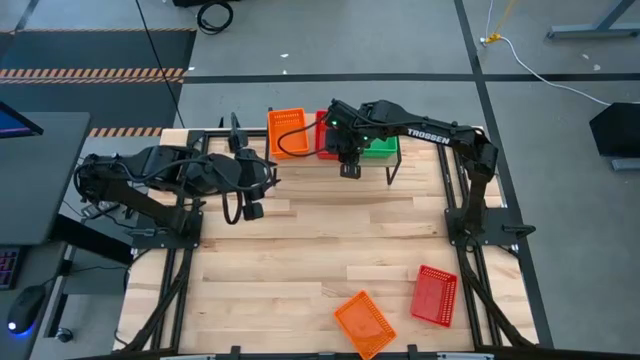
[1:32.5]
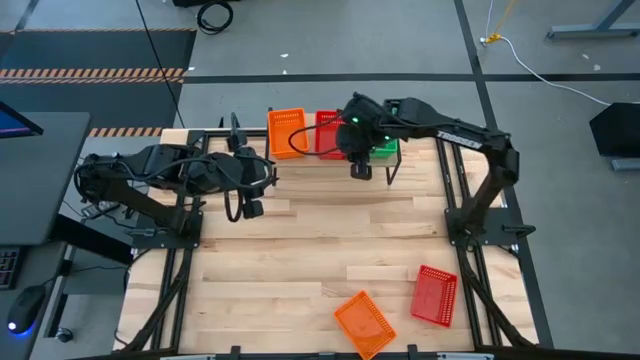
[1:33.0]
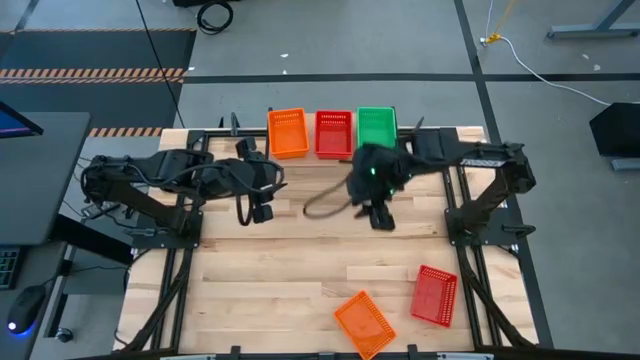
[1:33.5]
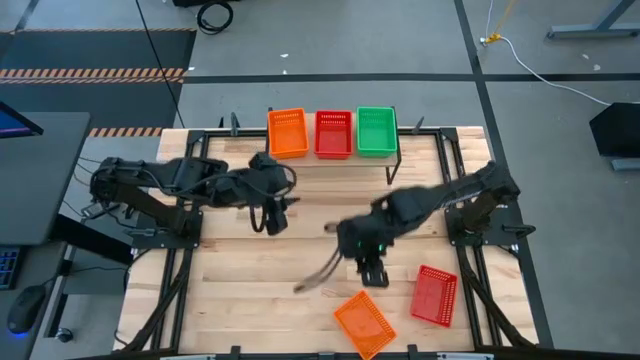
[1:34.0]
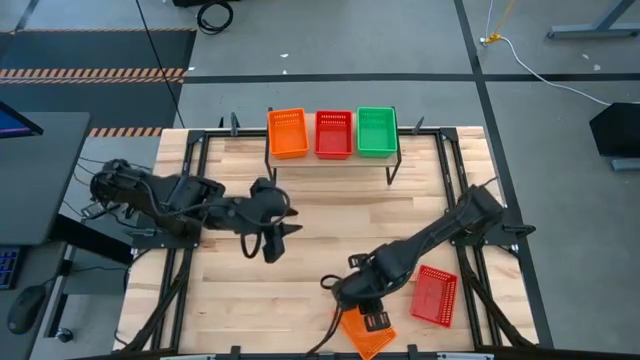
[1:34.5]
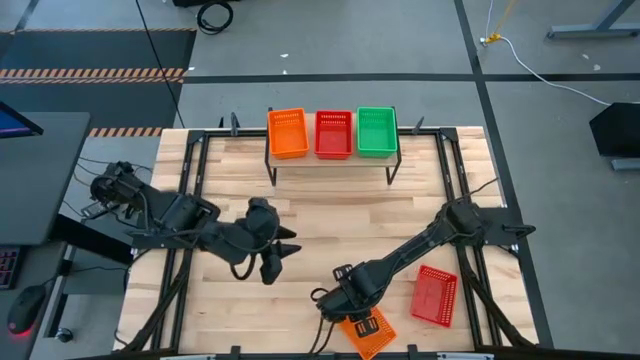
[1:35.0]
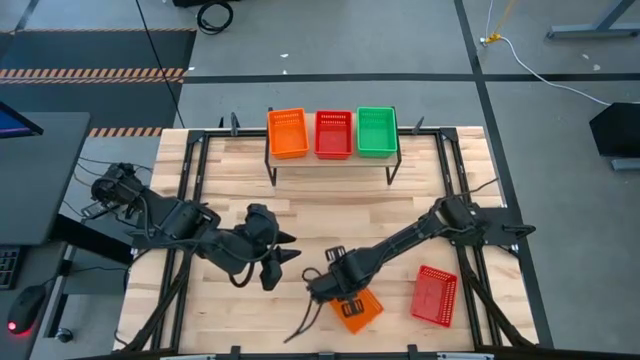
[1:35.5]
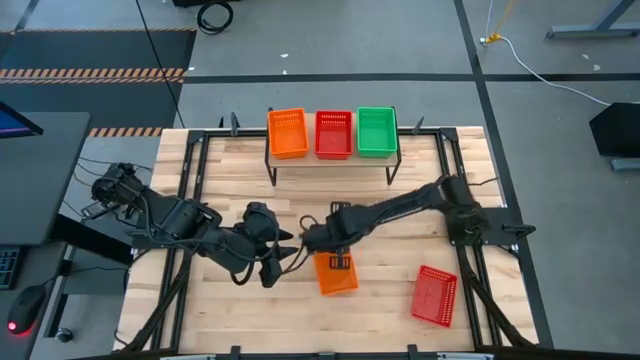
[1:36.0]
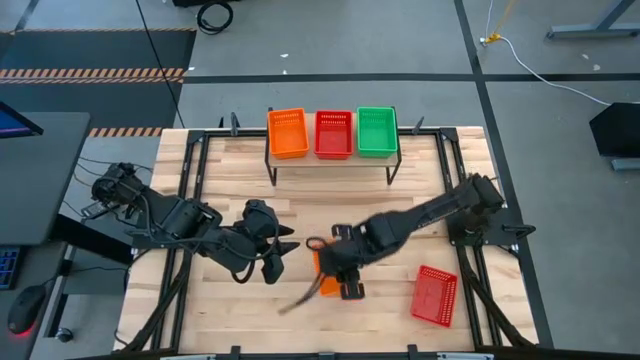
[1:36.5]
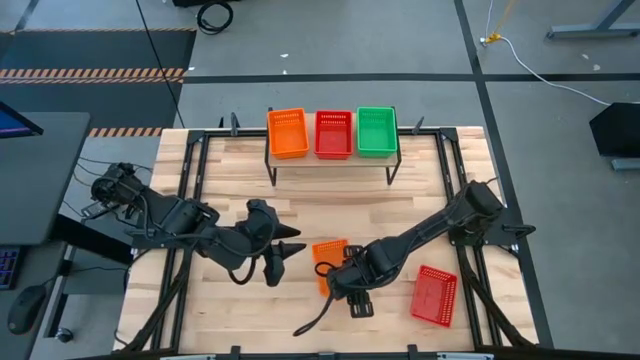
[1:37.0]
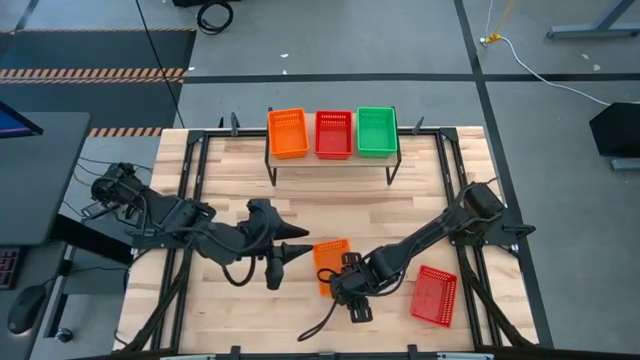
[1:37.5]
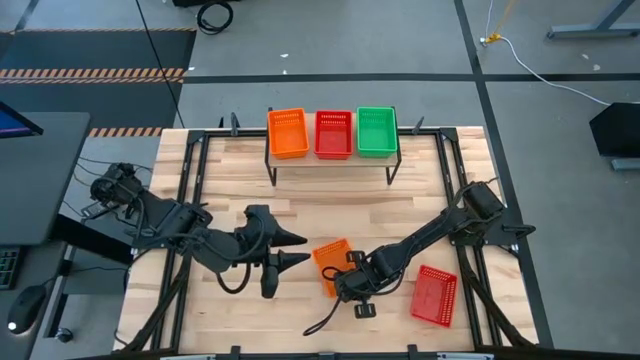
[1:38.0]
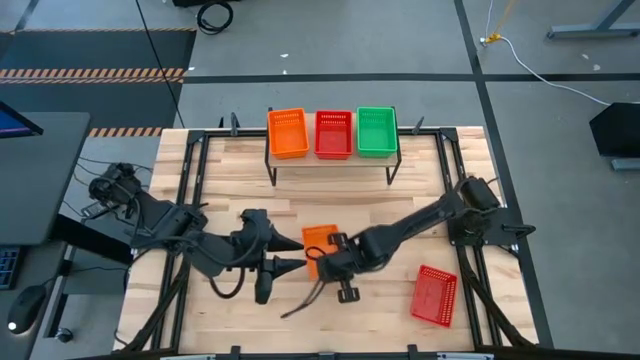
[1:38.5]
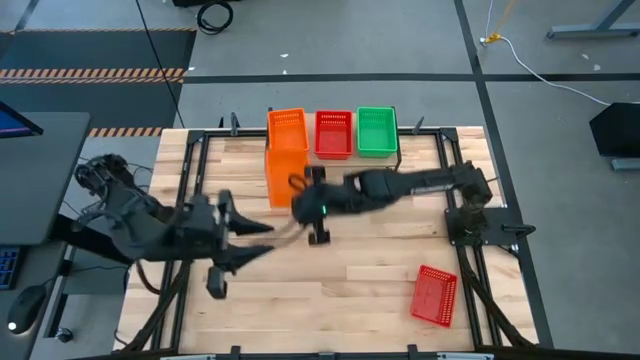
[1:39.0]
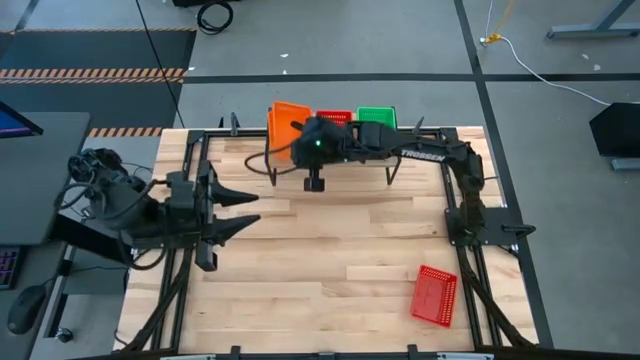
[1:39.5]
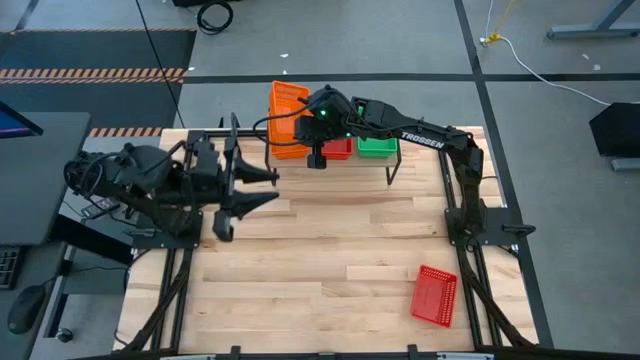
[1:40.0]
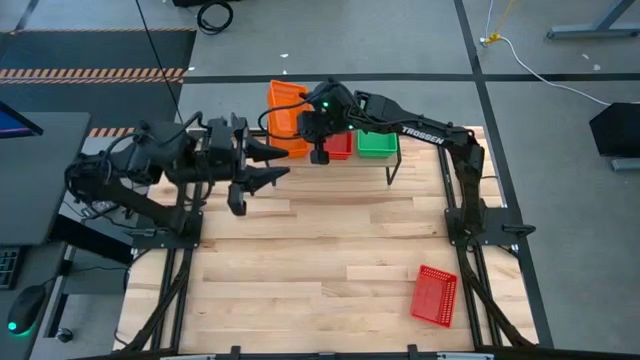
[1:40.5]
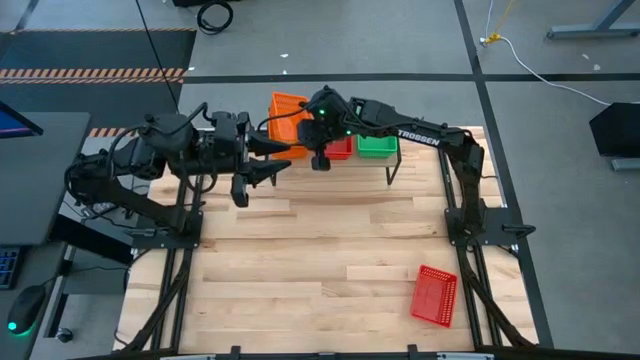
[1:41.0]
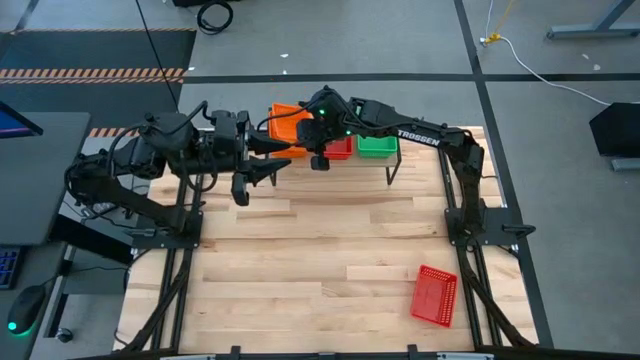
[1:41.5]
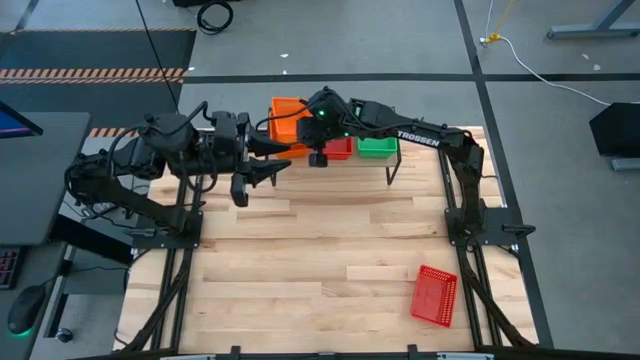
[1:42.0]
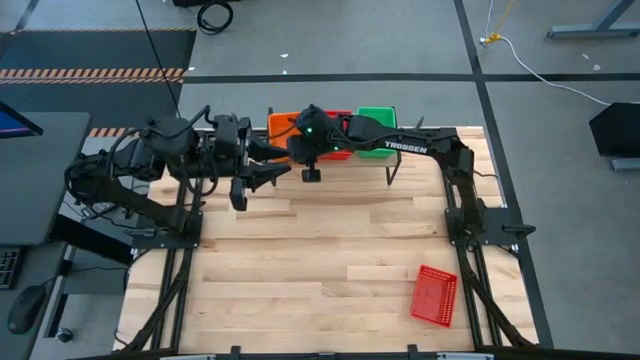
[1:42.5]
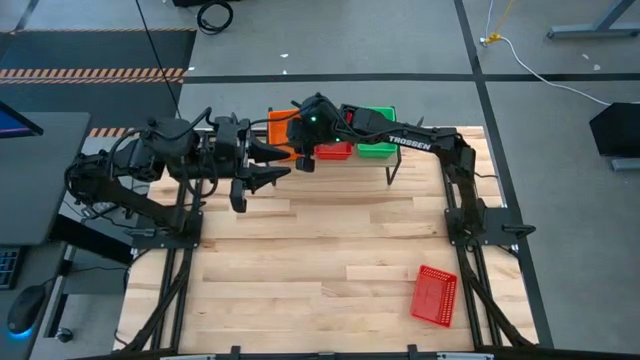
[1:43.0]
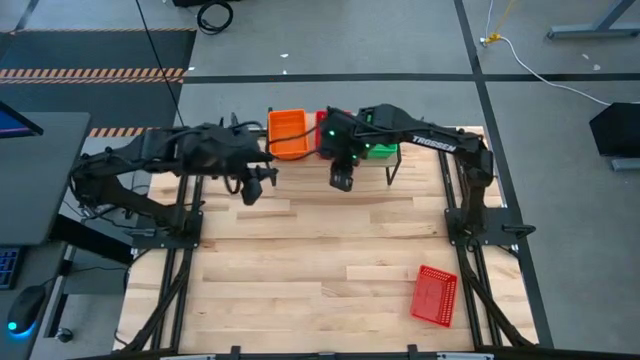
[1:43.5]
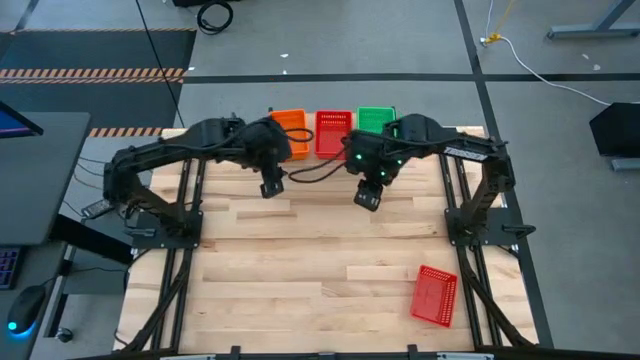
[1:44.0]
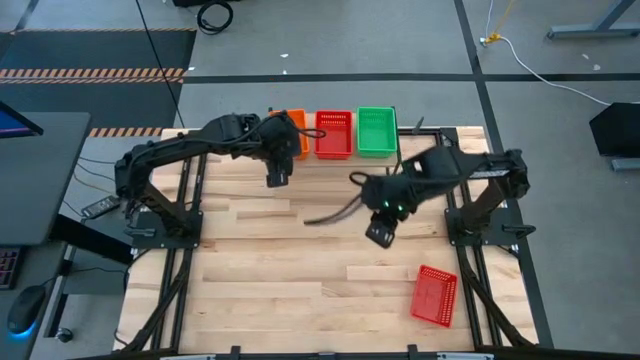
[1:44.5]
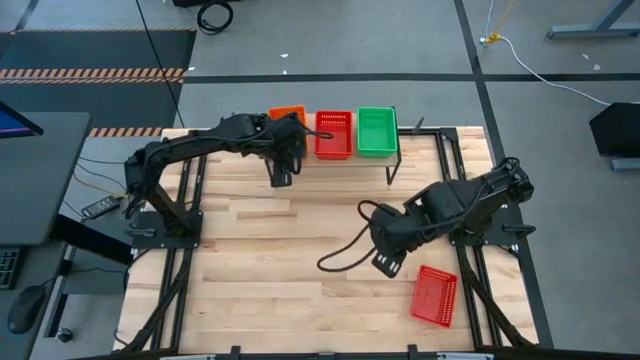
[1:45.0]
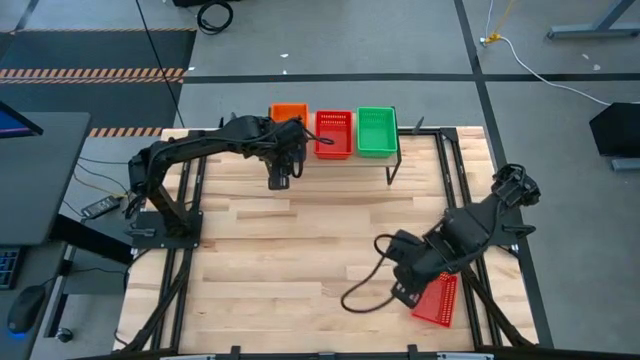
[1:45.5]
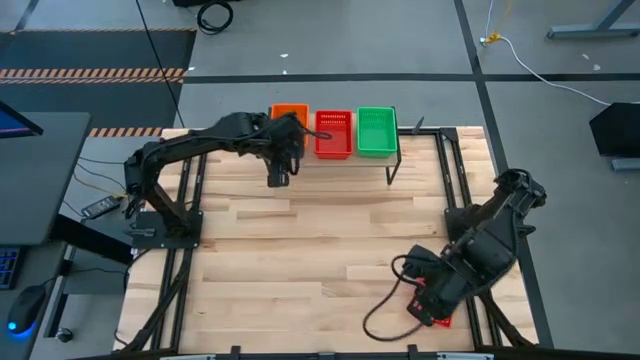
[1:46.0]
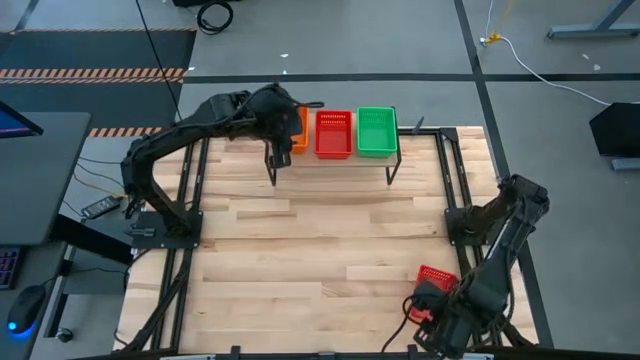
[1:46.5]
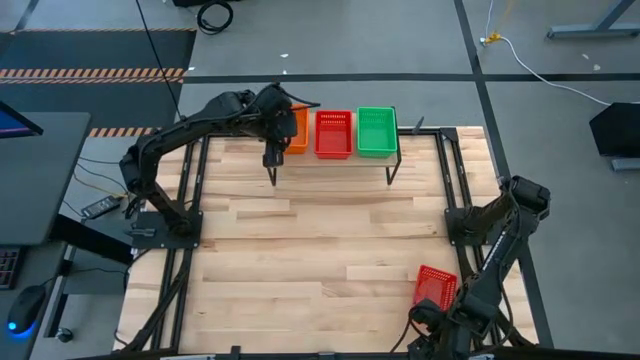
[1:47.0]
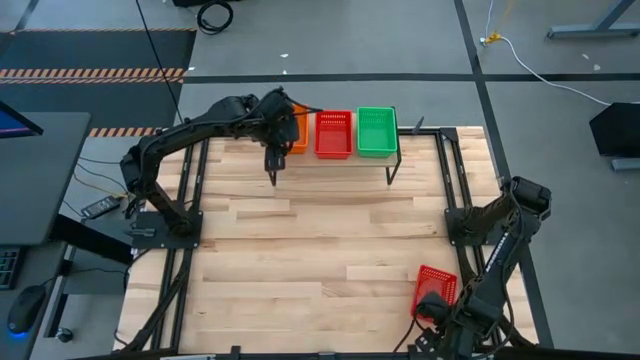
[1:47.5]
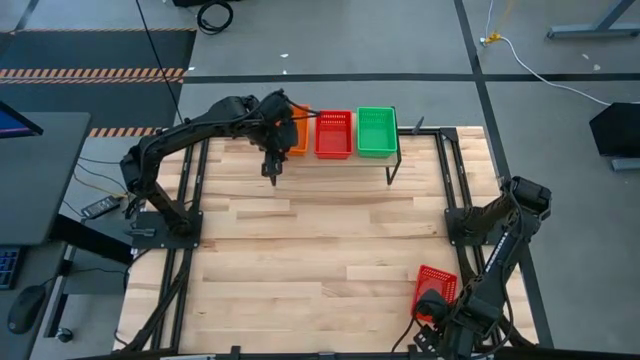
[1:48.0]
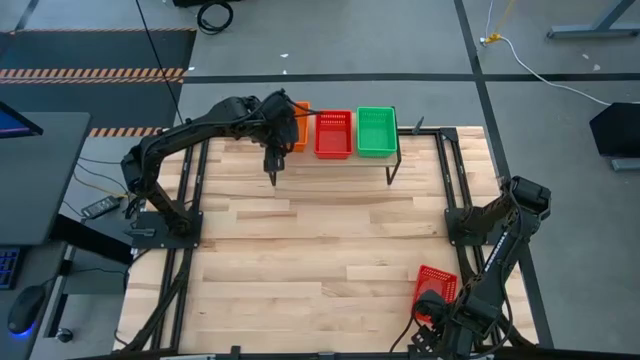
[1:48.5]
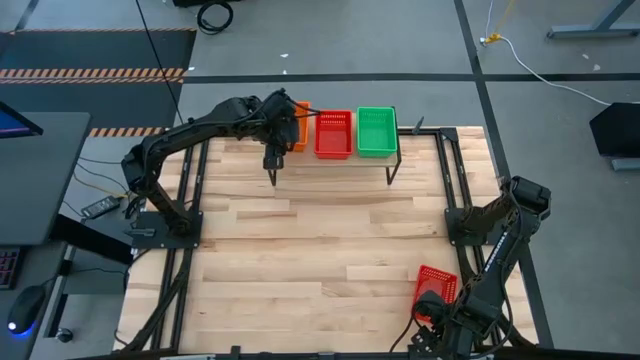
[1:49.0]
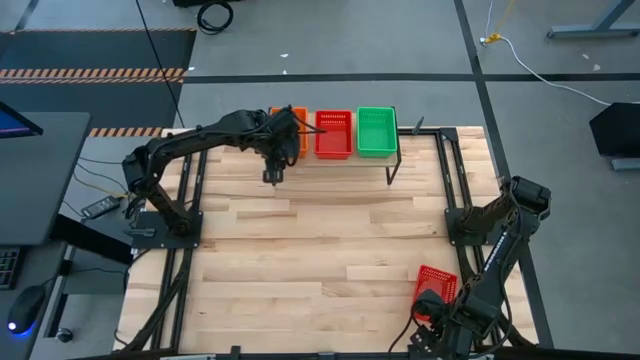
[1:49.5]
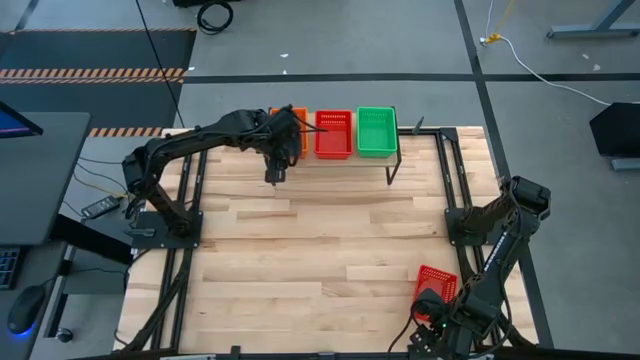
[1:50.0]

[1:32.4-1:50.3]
Task: Stack baskets on shelf by color
Stack the orange bin on top of the other orange bin on the shelf

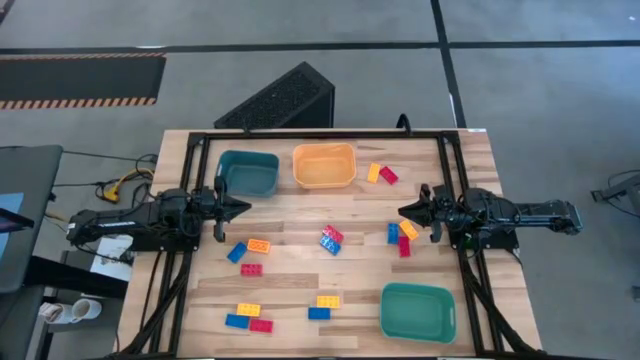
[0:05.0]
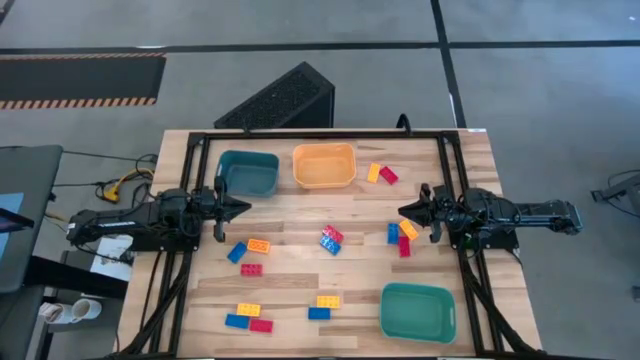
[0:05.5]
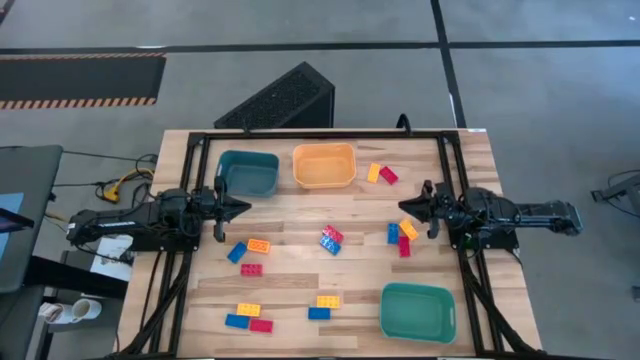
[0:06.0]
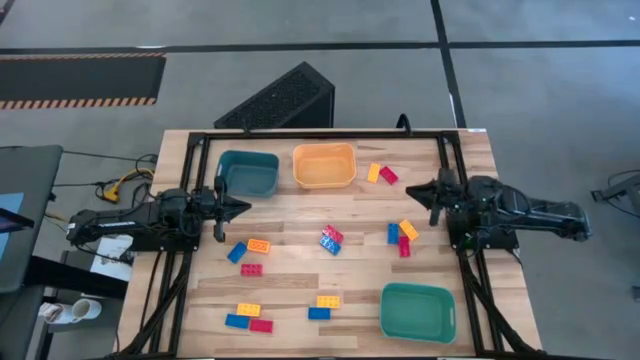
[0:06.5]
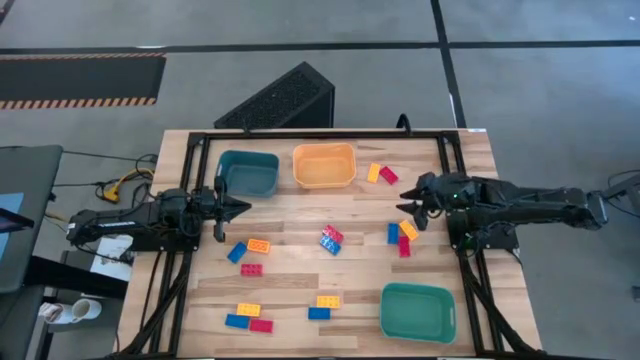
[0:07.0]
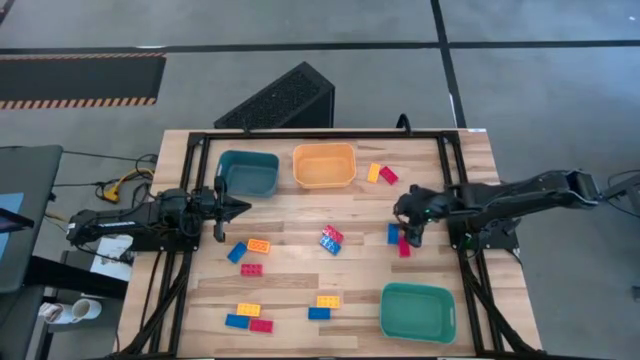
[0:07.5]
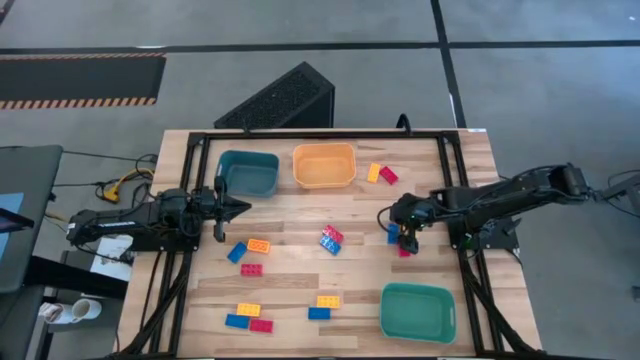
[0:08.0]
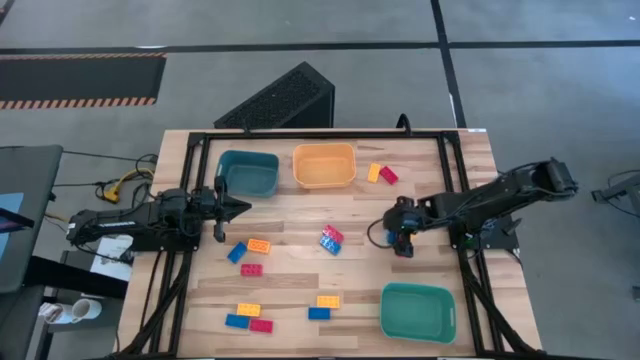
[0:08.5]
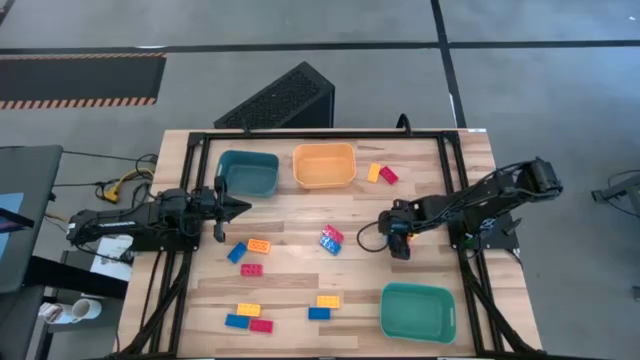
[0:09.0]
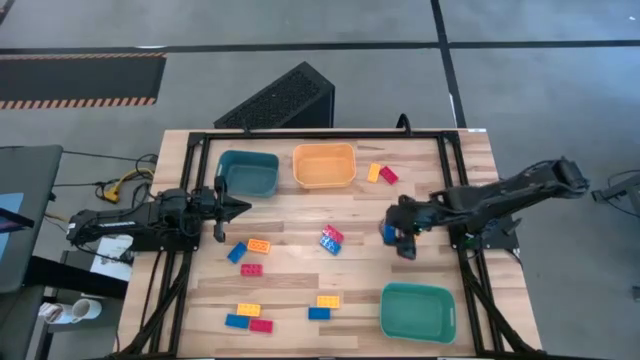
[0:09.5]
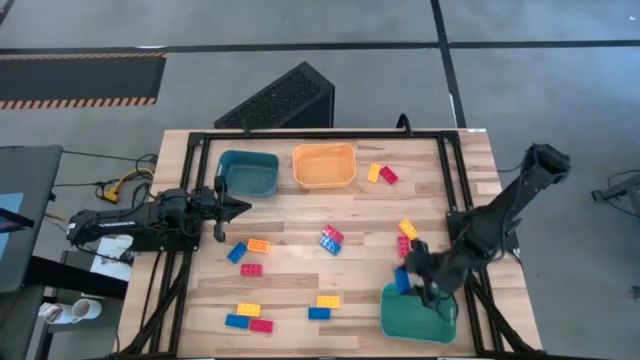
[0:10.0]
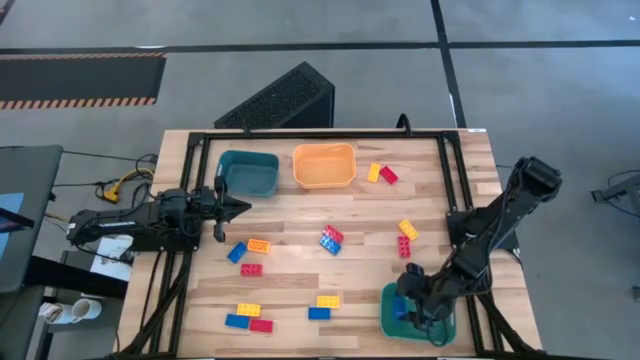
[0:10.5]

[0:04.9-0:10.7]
Task: Sort & place blocks by color
Put the blue game piece into the green bin
